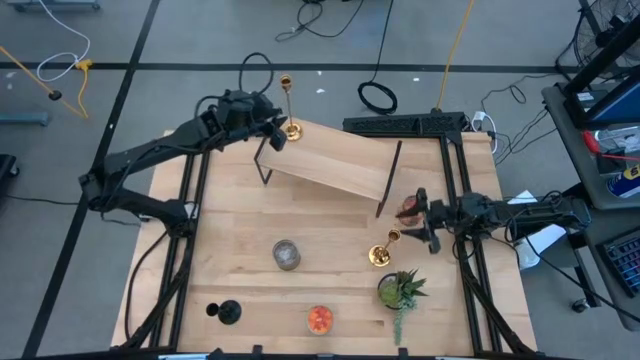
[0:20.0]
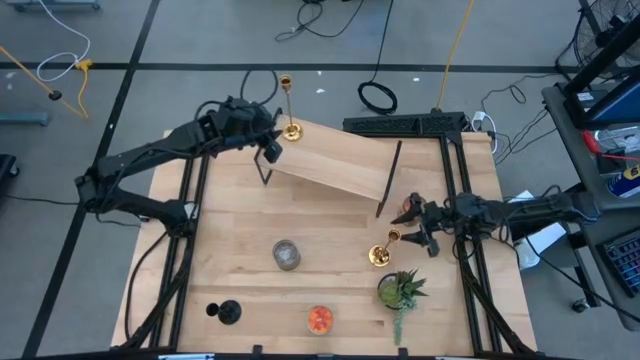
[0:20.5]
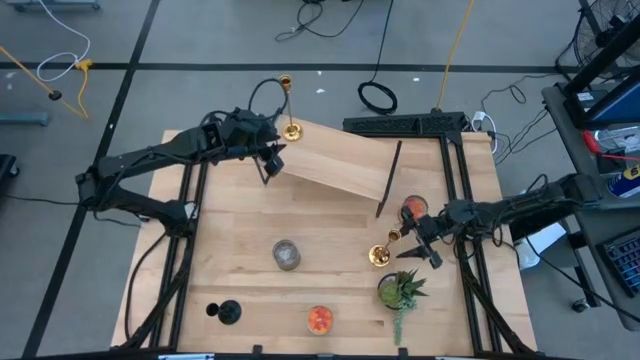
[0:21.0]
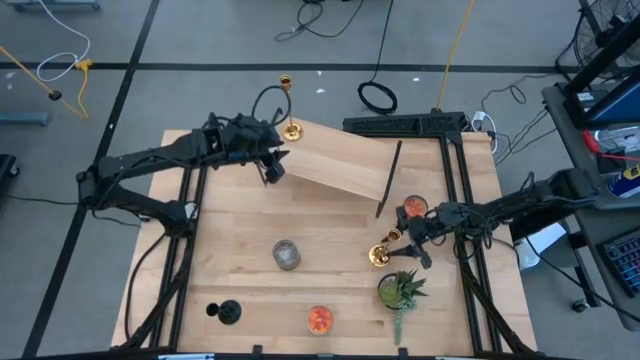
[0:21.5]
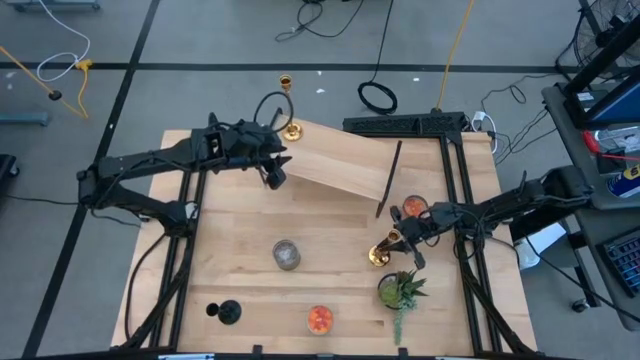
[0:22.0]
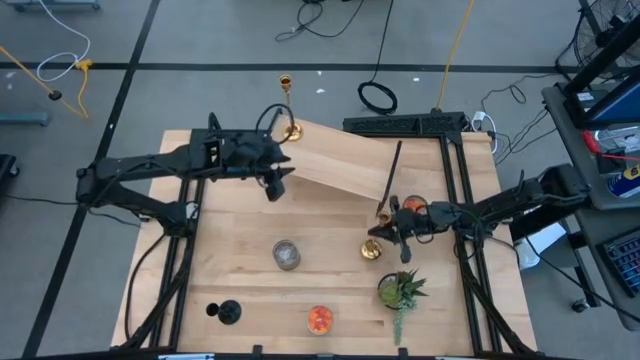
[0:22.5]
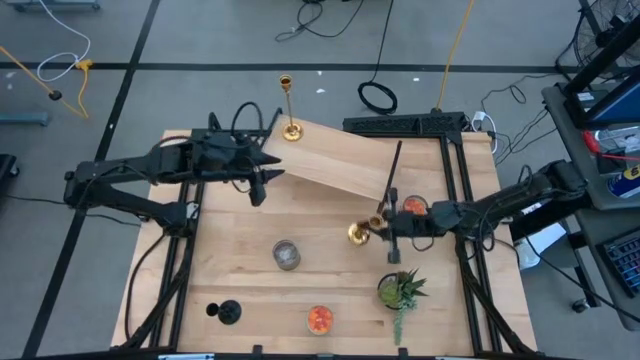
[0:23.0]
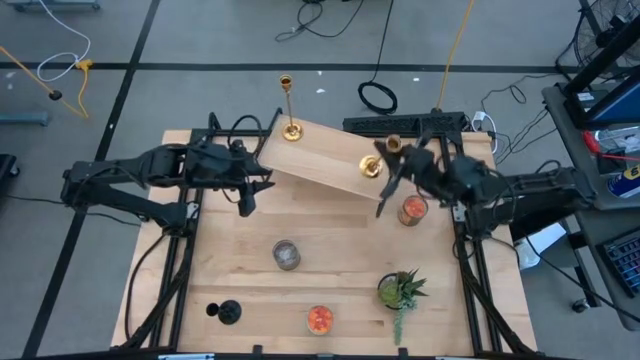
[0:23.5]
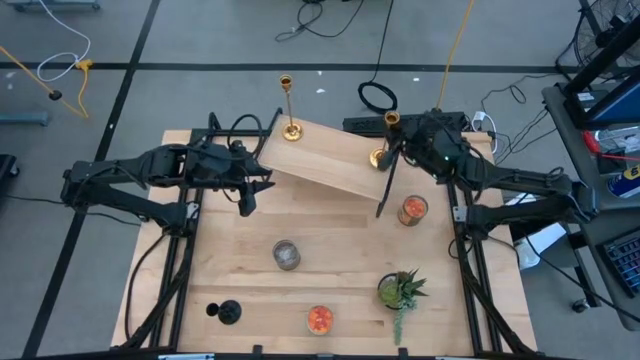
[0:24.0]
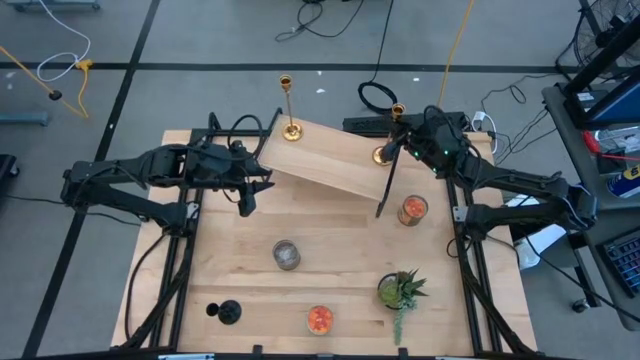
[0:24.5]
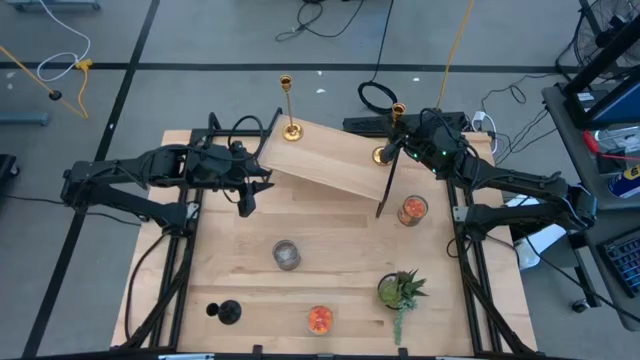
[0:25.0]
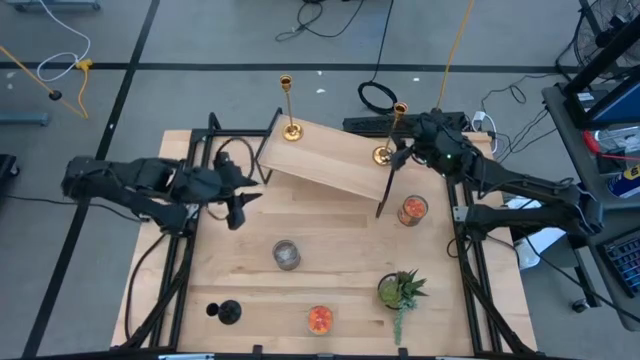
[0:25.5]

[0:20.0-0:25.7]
Task: Pick & Place candle stick holders
Put the gold candle holder on the shelf

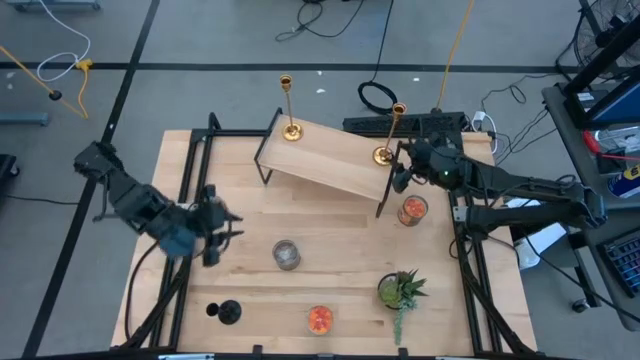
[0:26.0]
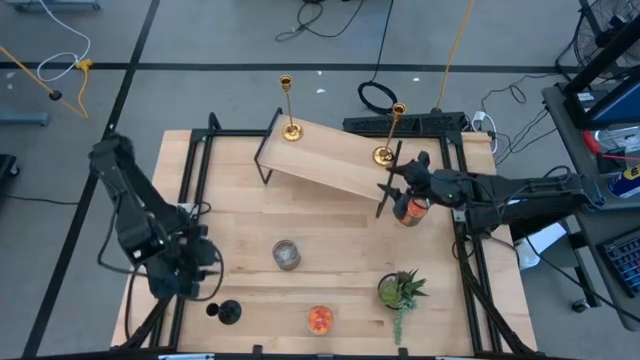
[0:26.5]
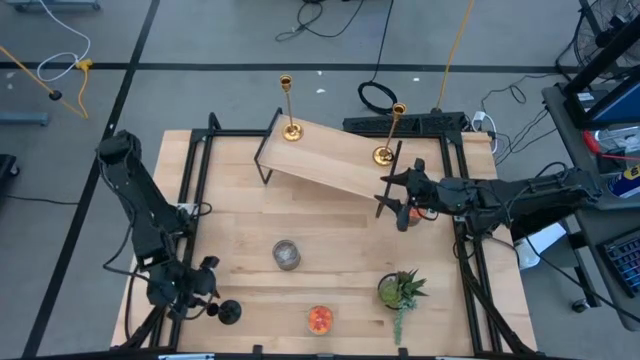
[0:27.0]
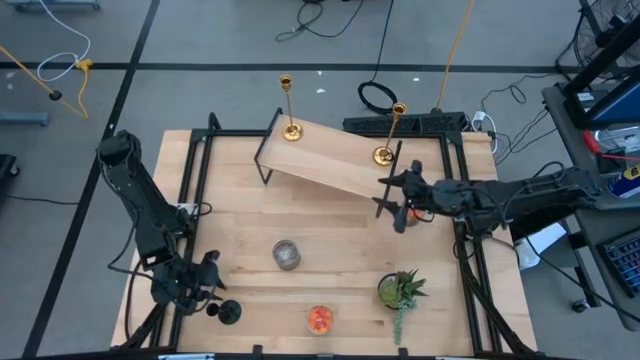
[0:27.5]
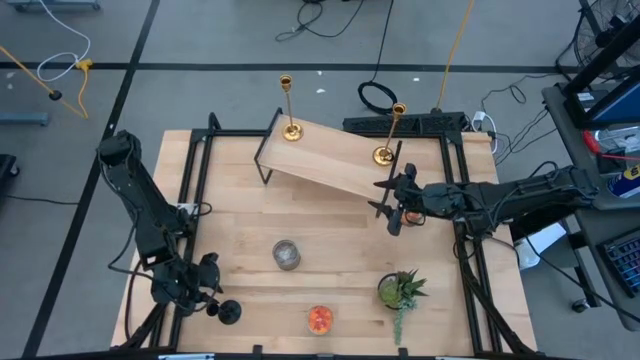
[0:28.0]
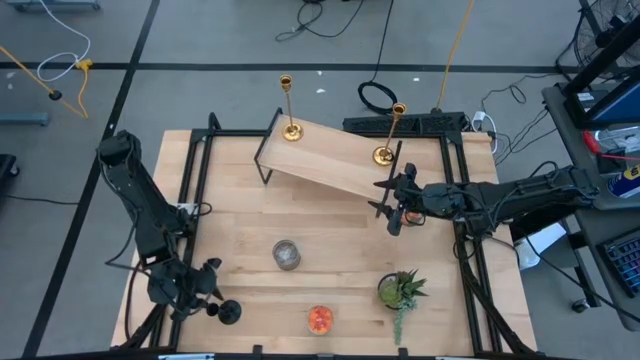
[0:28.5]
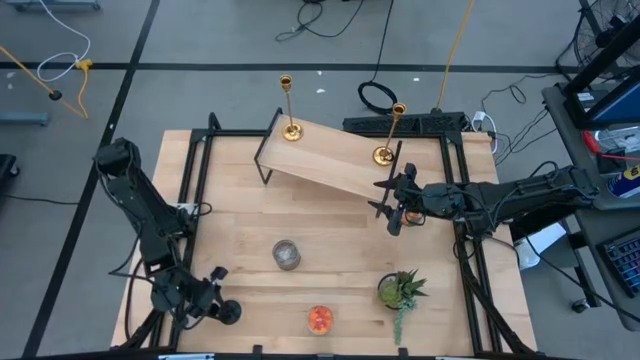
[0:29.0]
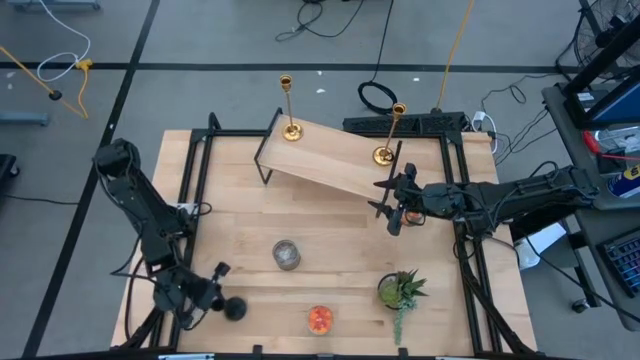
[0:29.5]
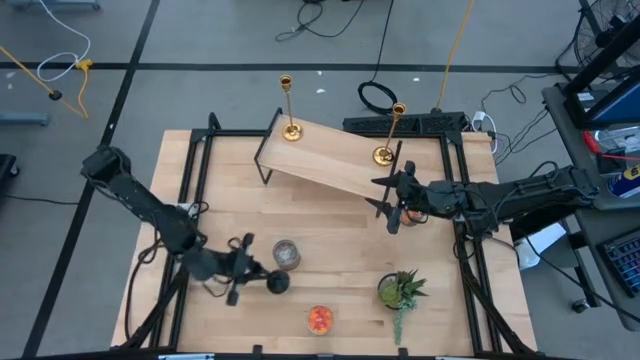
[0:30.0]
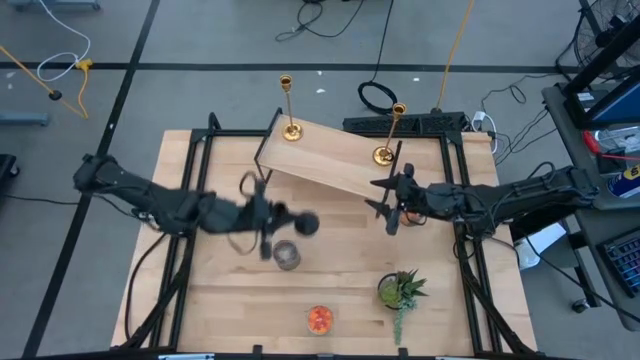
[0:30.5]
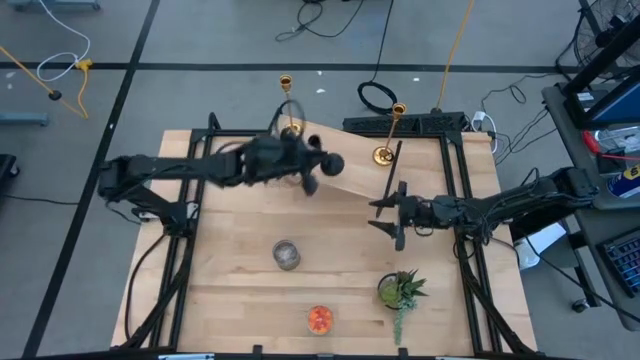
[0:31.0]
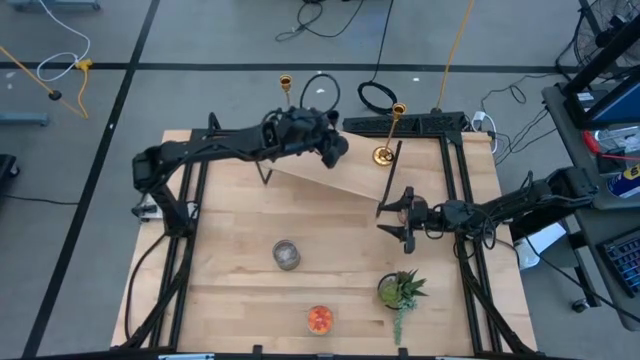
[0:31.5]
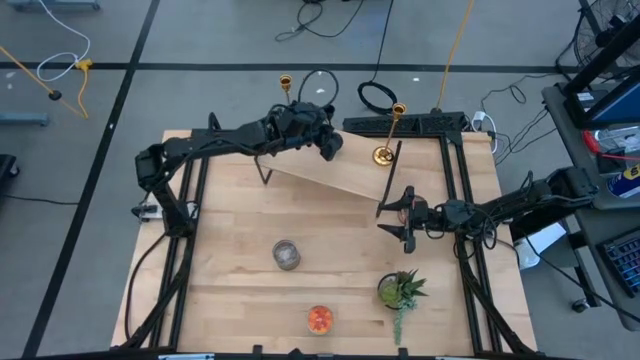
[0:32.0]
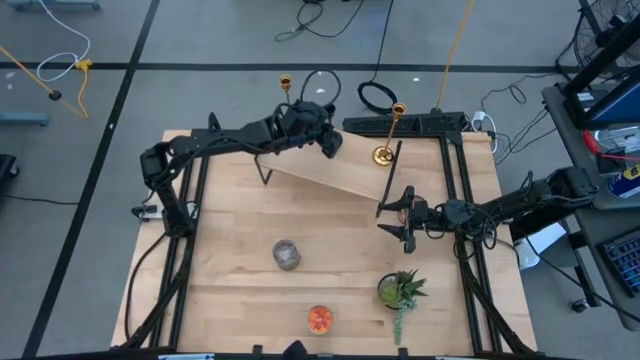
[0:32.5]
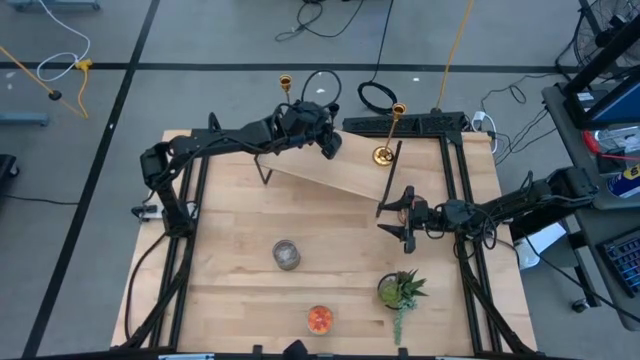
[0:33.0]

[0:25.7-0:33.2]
Put the black candle holder on the shelf

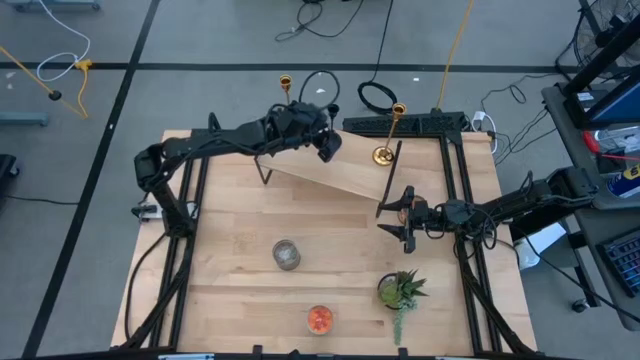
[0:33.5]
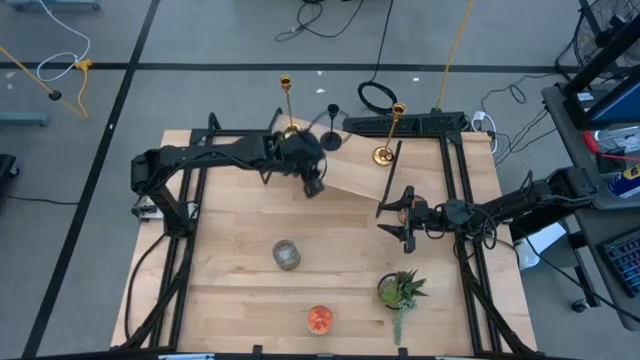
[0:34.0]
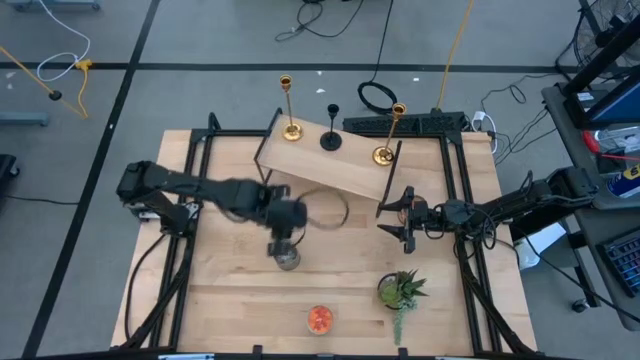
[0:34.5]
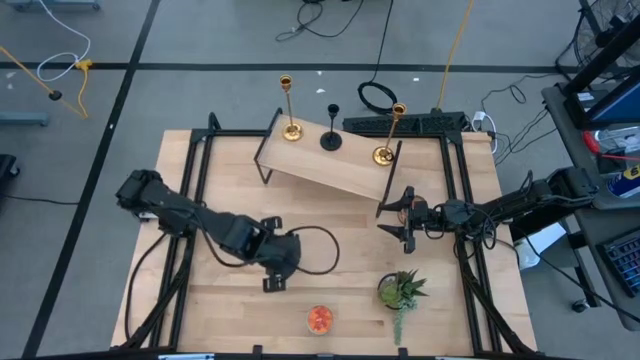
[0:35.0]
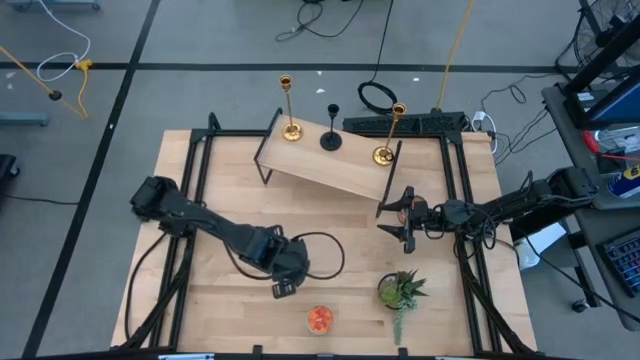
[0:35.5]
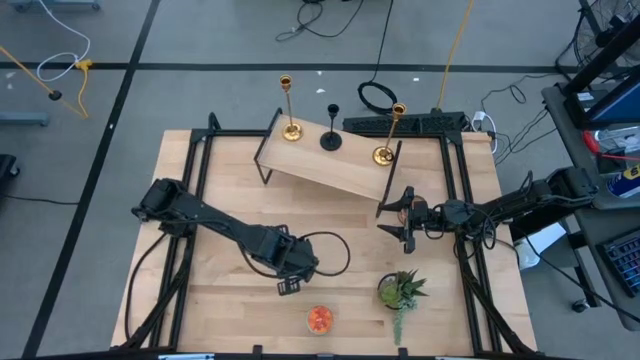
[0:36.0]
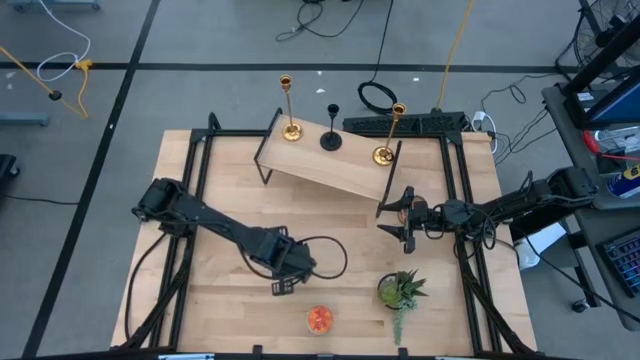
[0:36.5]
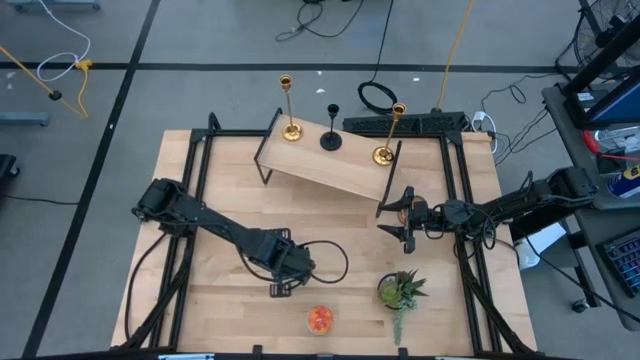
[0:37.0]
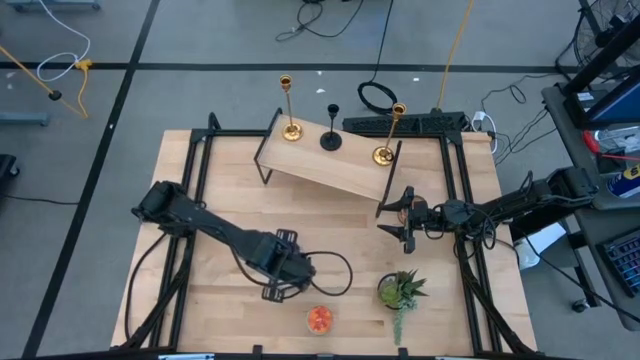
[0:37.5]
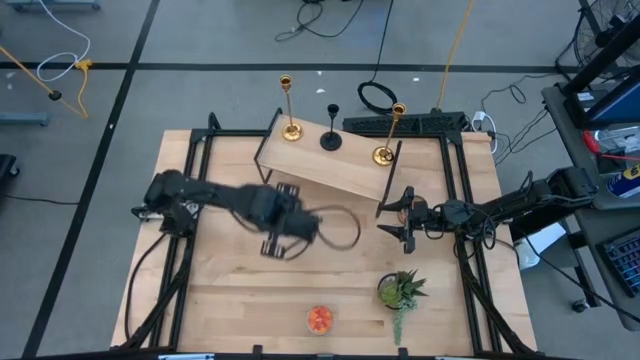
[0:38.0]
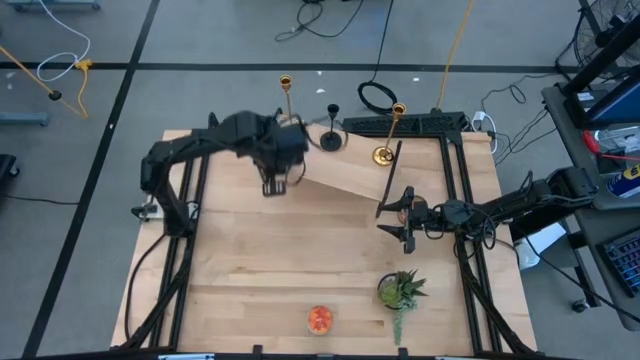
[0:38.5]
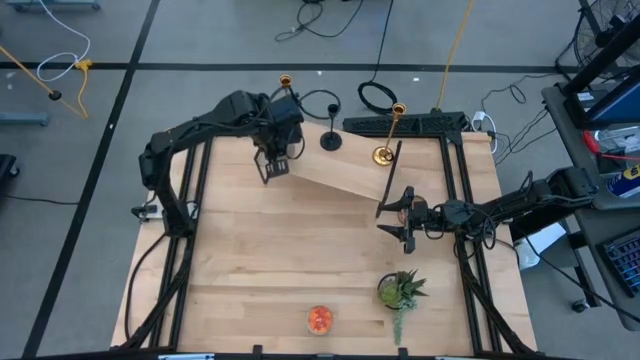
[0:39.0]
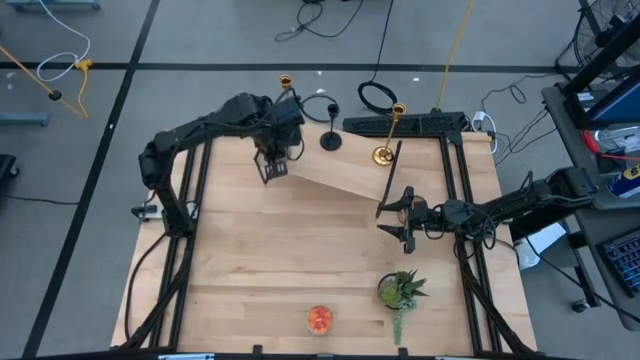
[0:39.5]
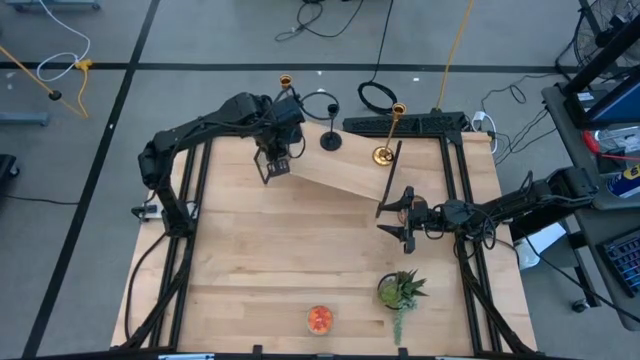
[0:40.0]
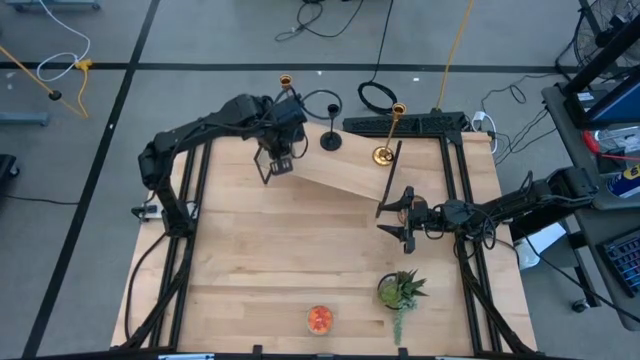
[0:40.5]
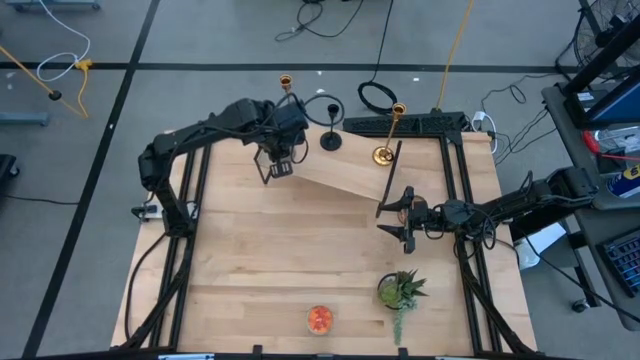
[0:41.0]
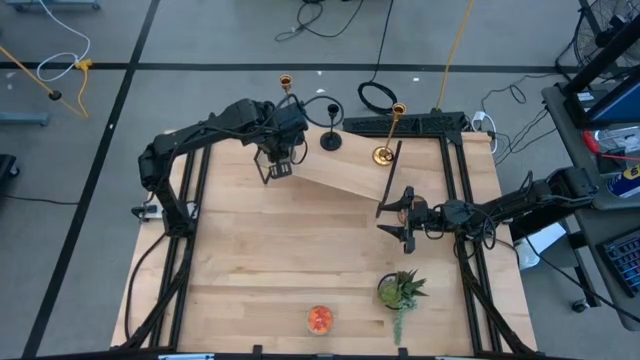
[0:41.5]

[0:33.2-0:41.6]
Put the brown scented candle on the shelf
